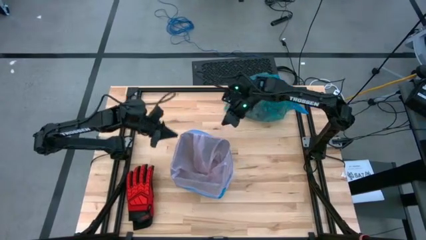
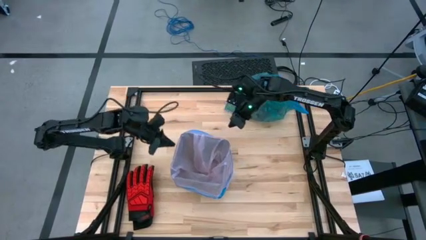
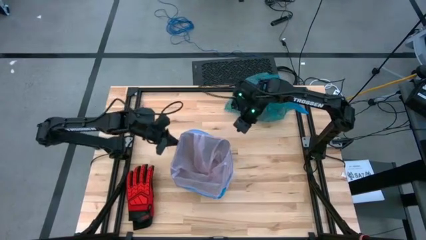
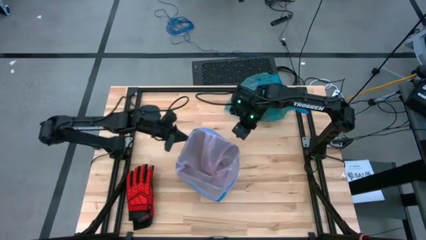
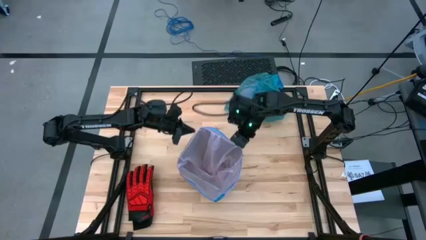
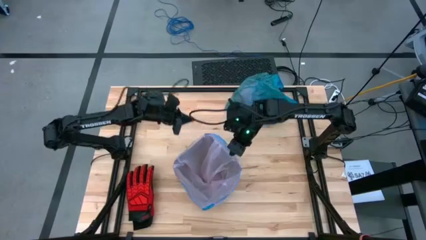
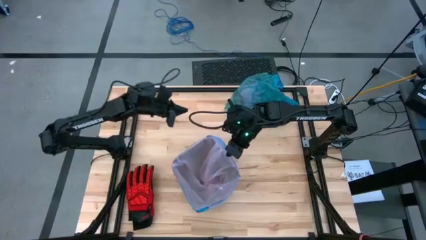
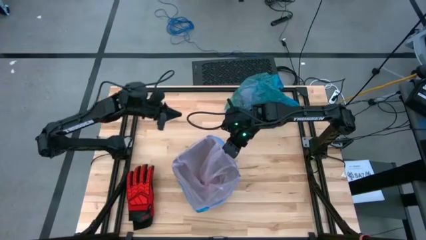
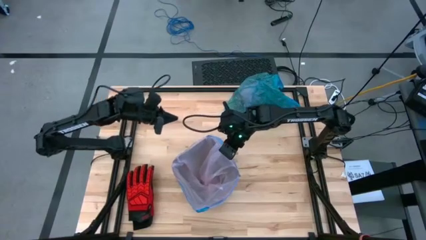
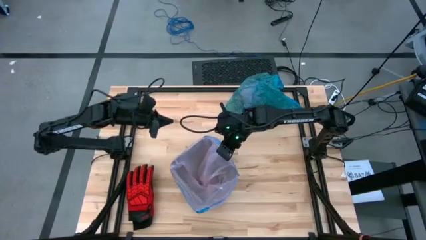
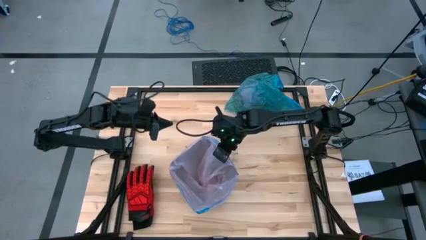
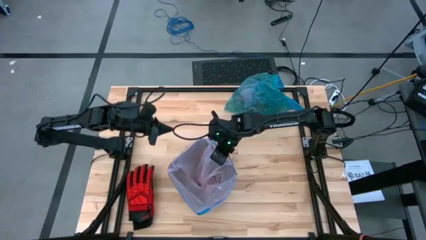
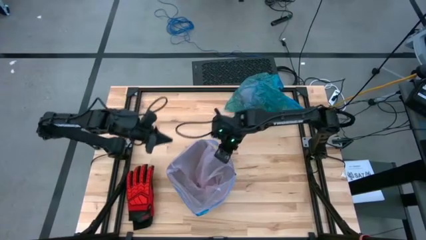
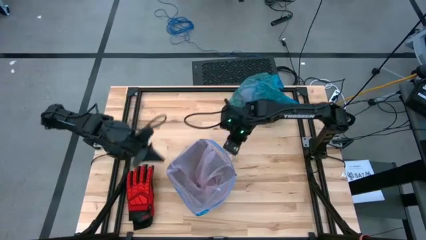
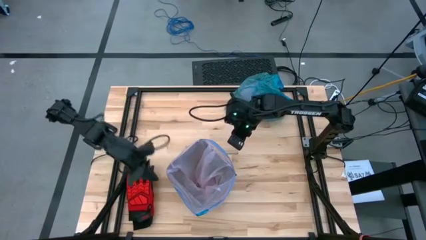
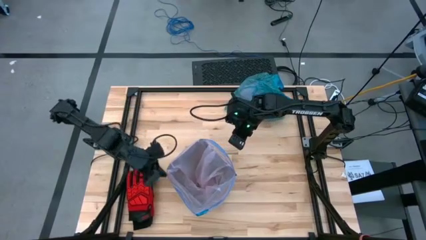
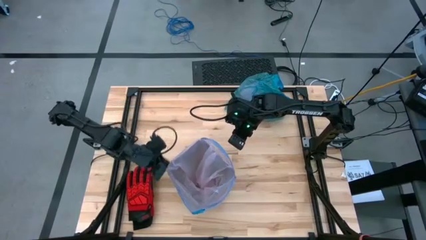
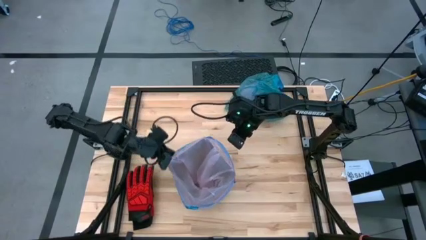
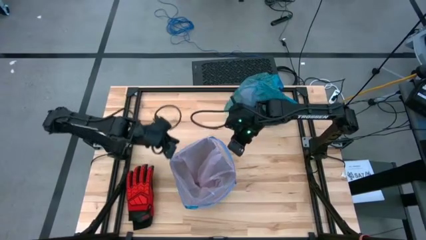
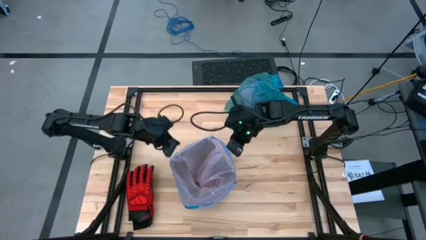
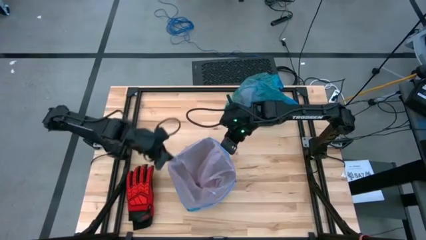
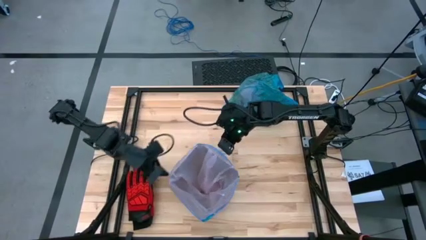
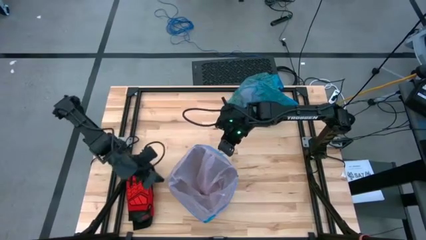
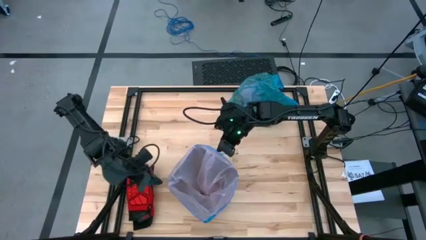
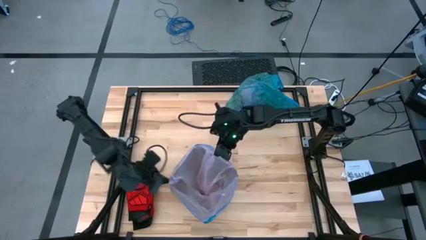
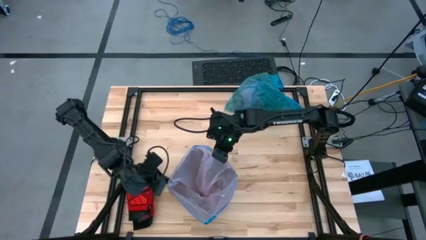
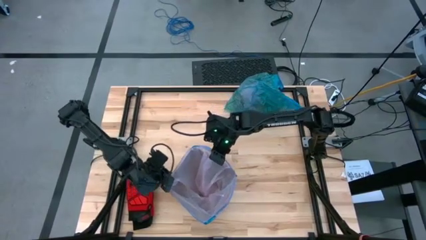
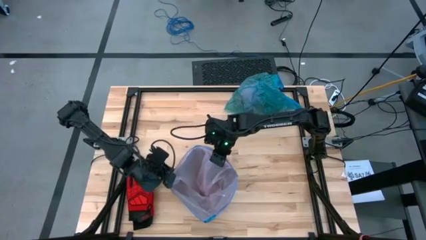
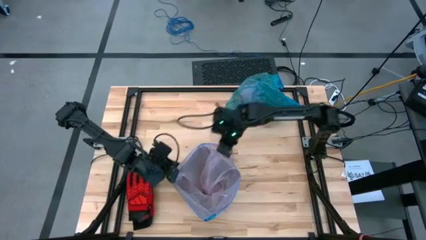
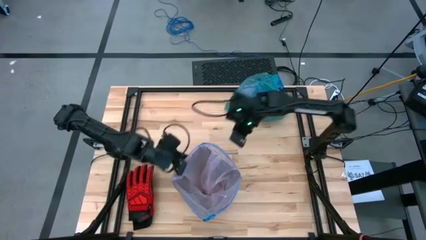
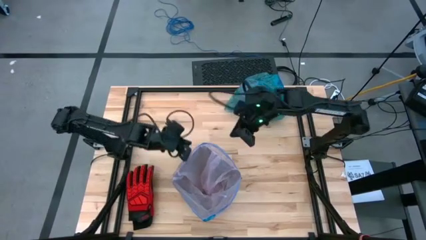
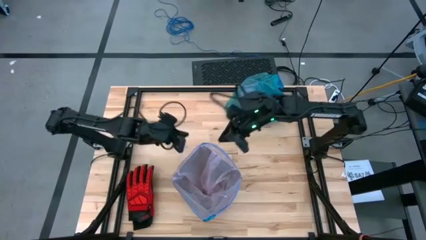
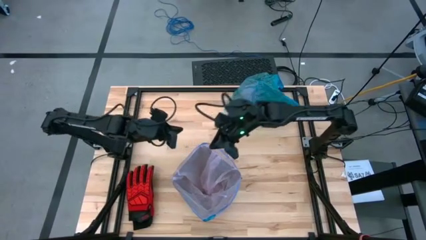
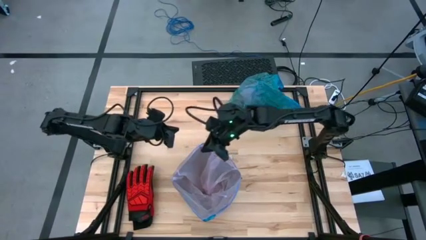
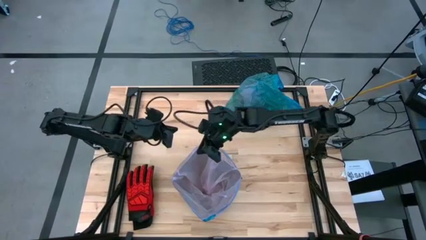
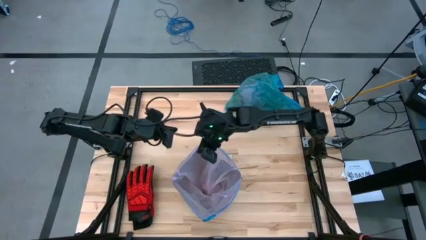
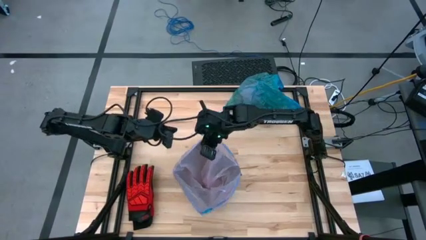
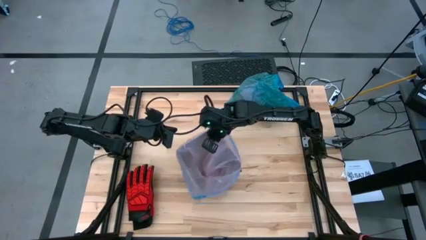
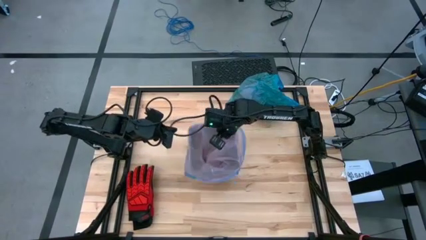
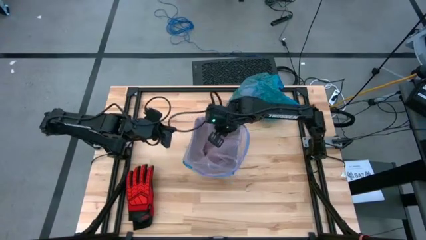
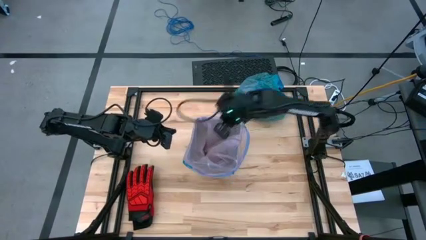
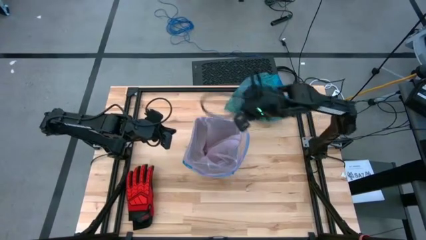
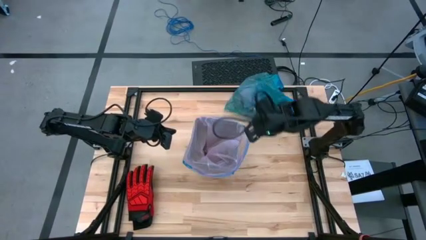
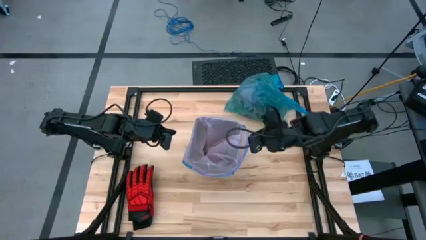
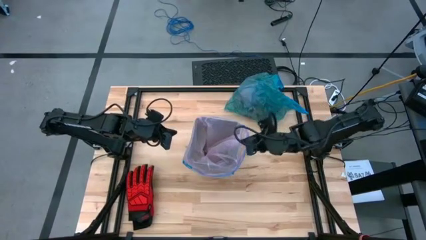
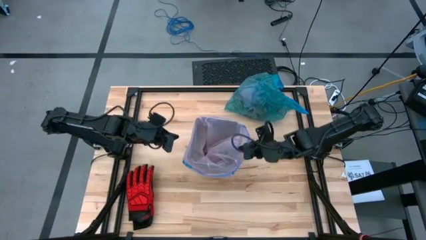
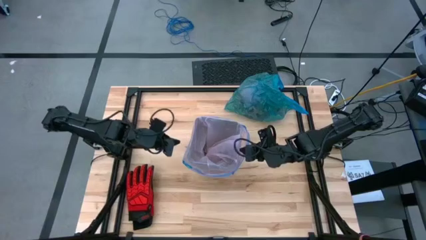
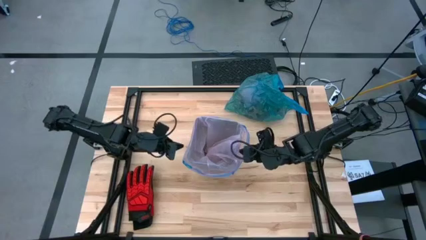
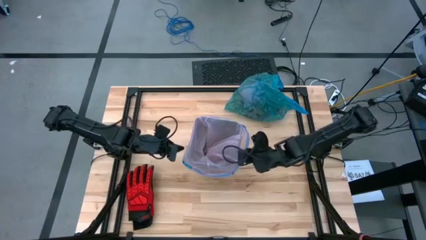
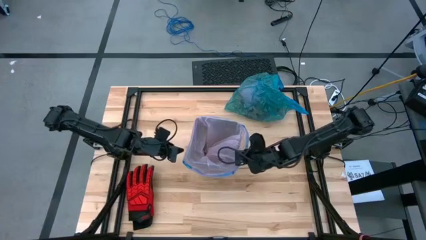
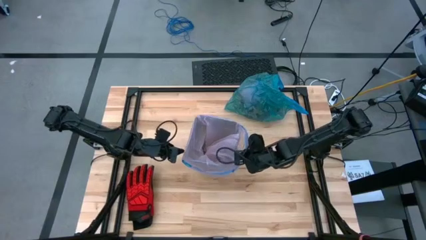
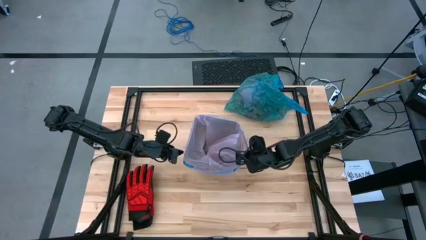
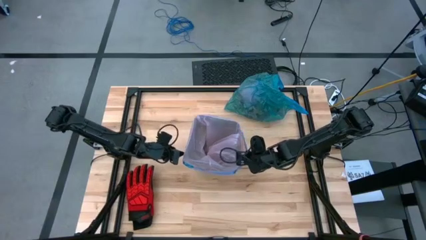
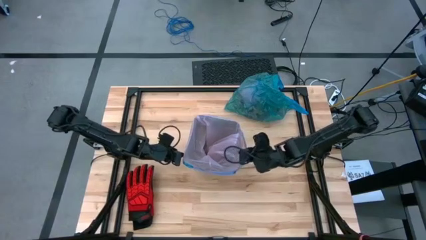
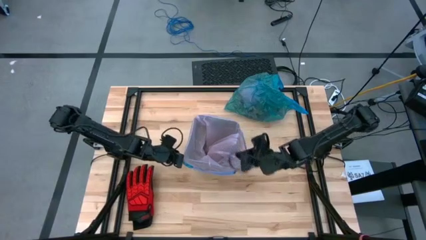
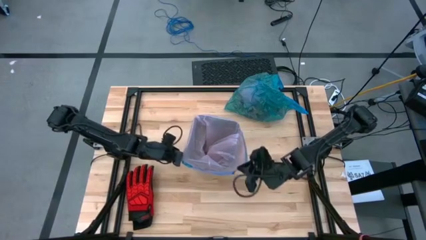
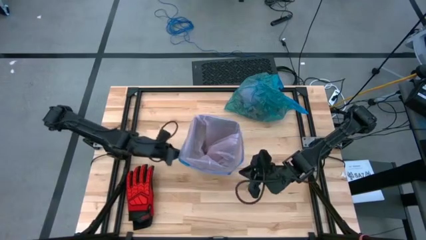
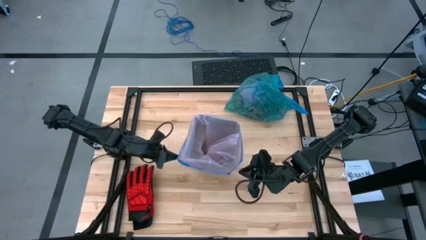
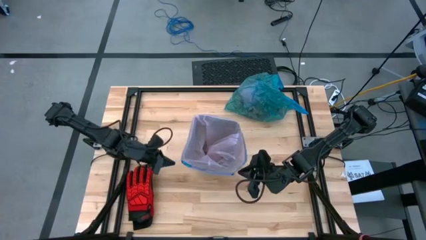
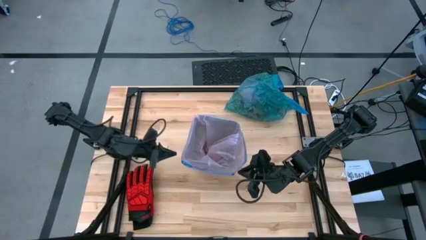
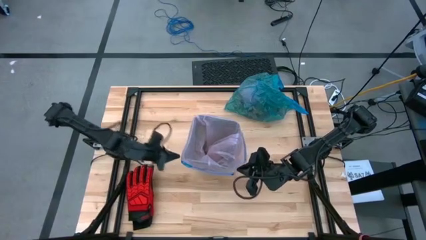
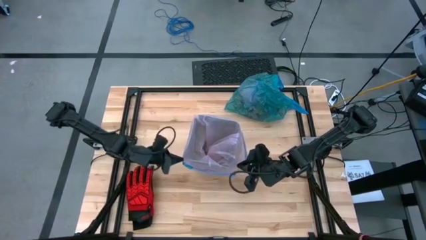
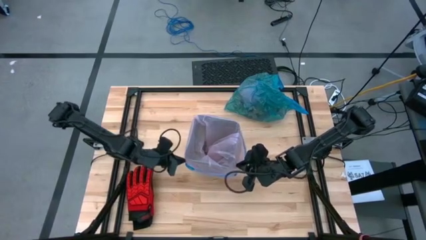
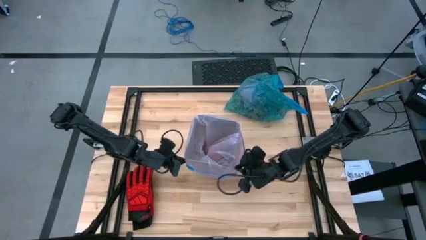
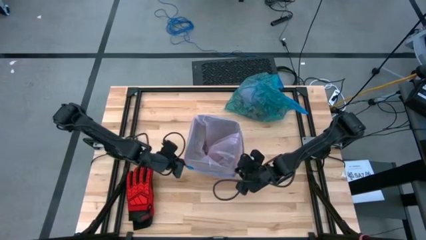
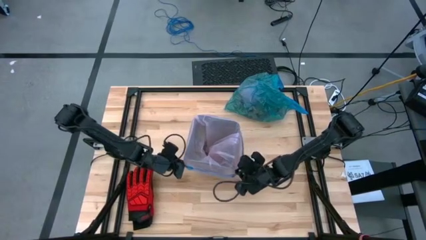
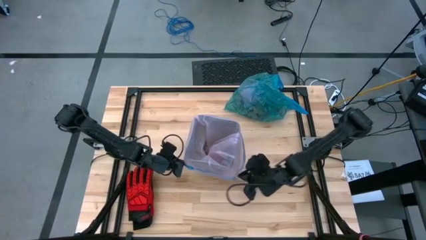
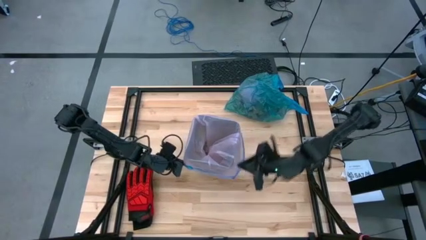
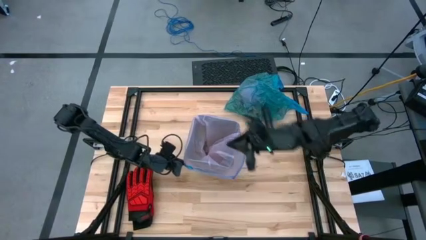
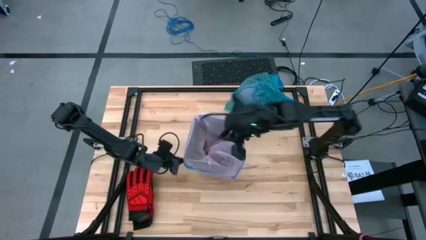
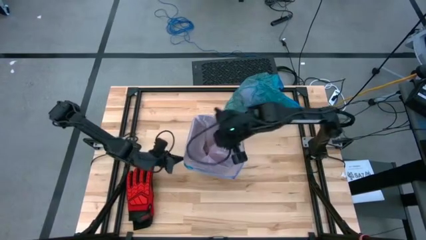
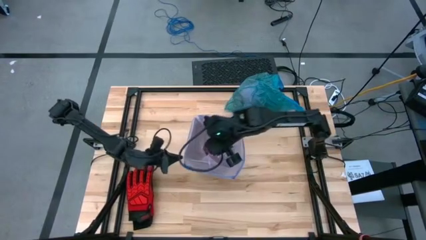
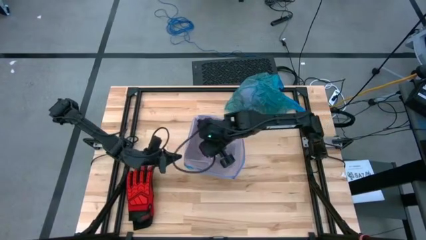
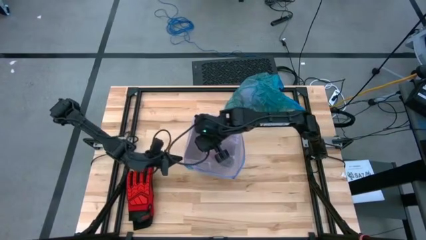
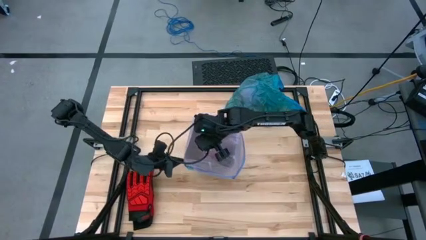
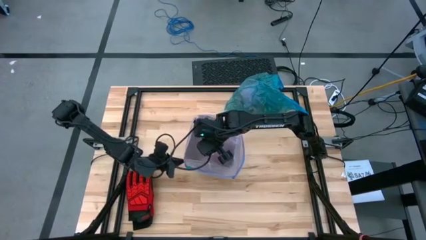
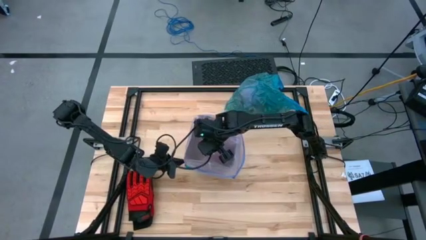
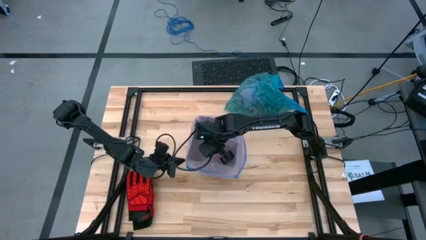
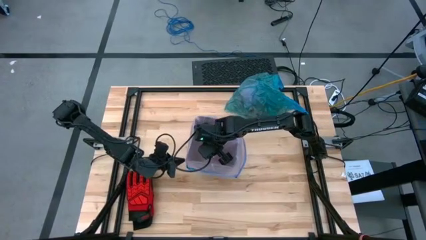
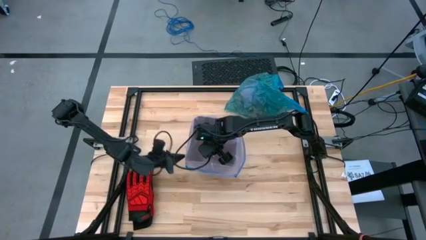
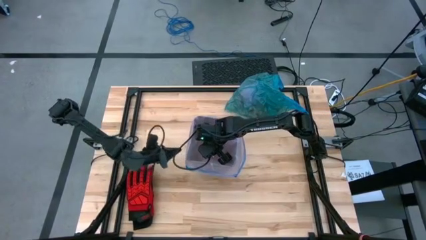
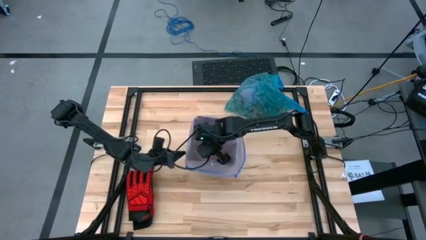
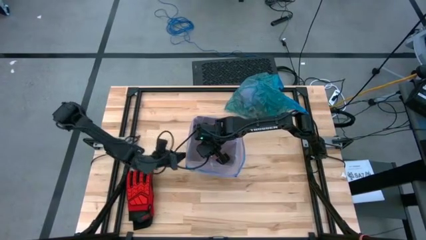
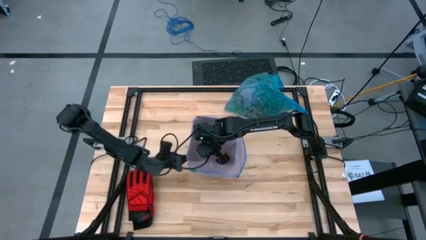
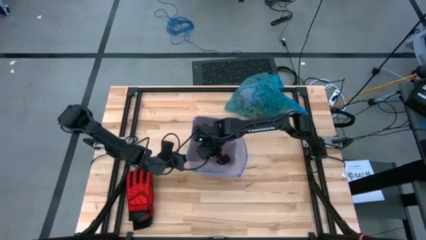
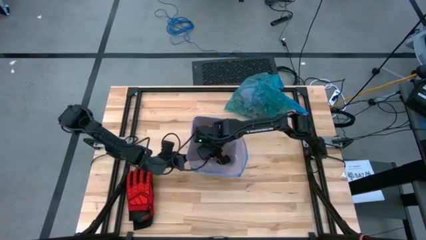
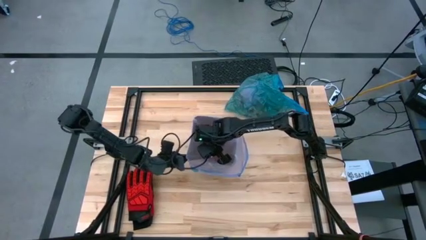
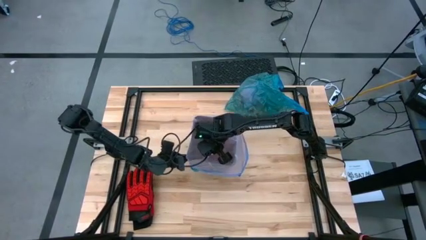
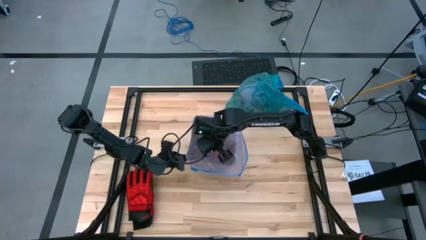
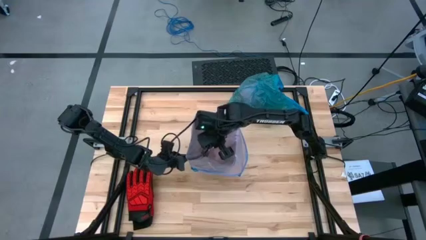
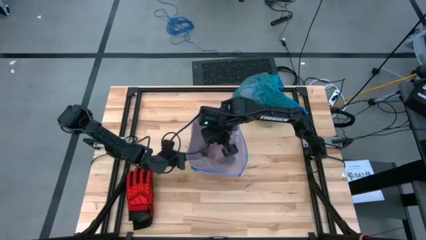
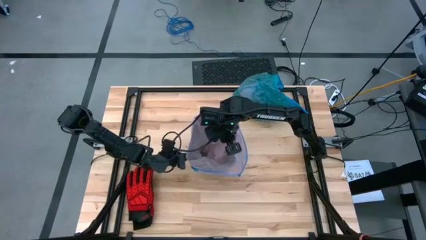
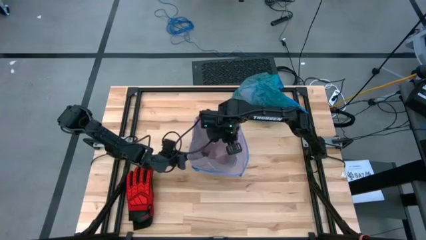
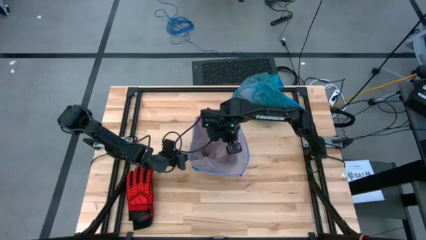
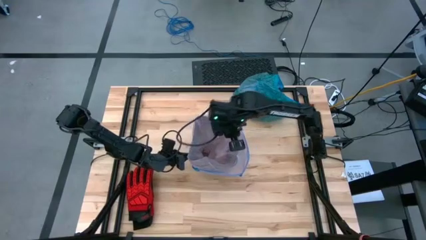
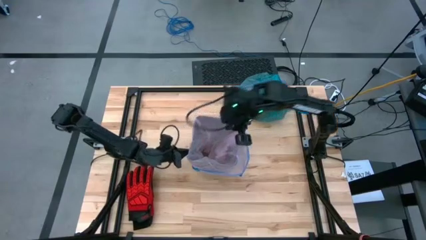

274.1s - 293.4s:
Task: place trash/remove bag and relplace
Put the pink trash bag into the trash bin
